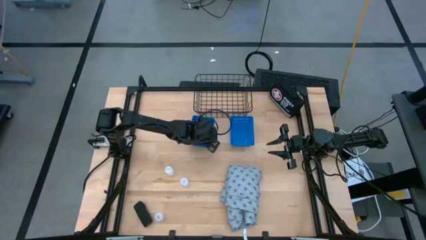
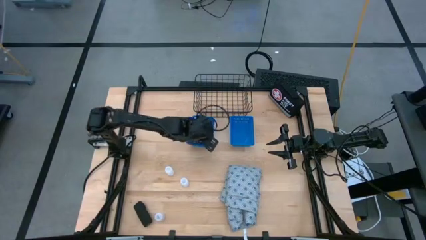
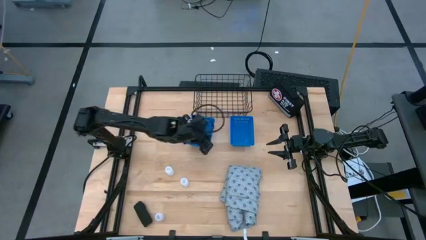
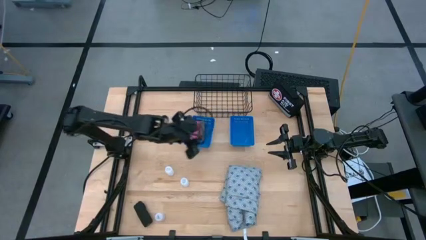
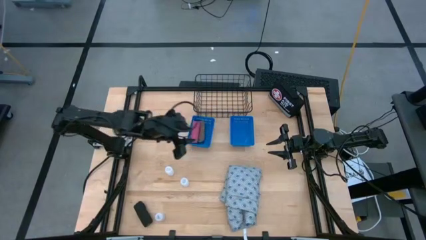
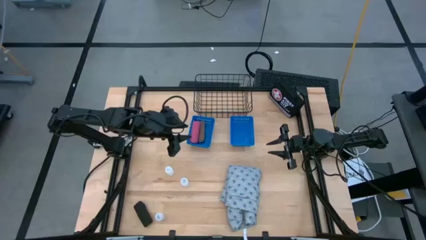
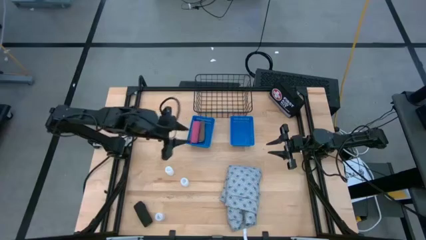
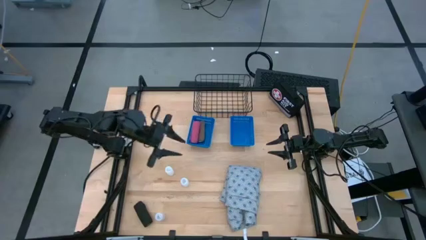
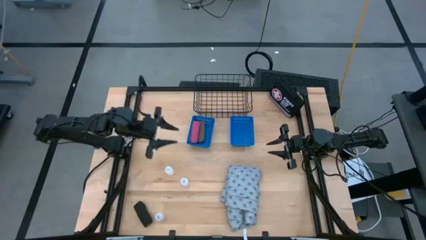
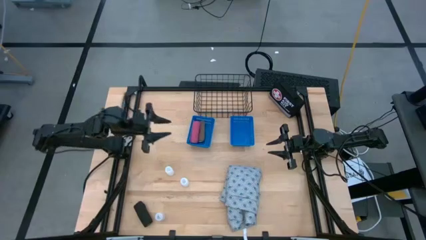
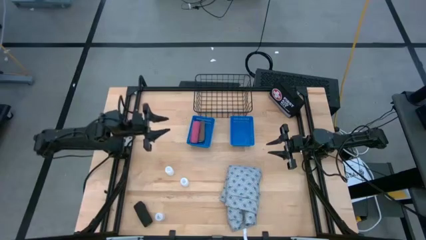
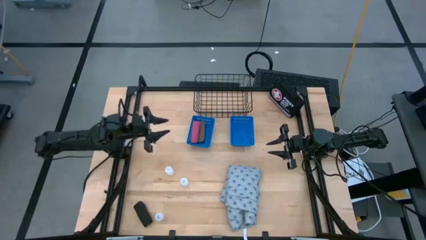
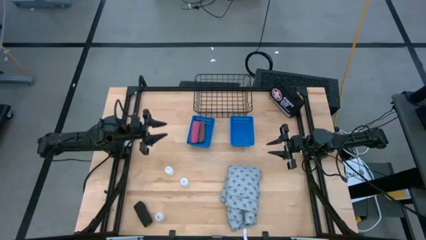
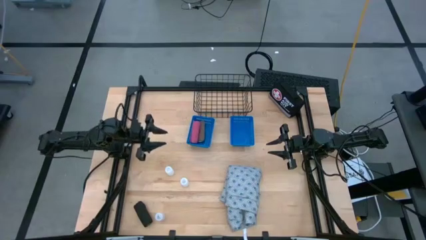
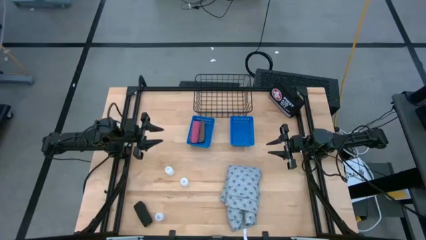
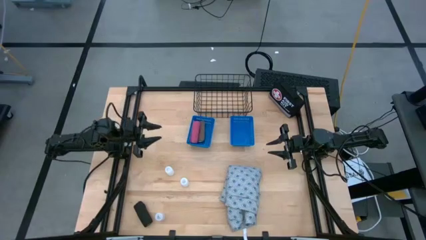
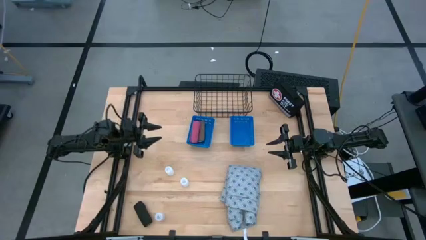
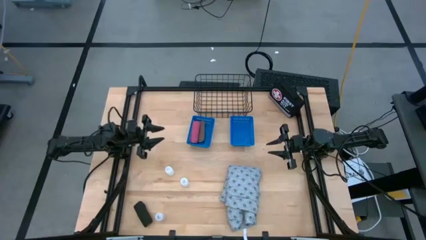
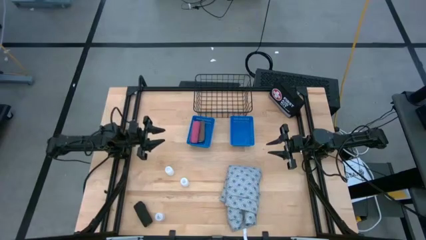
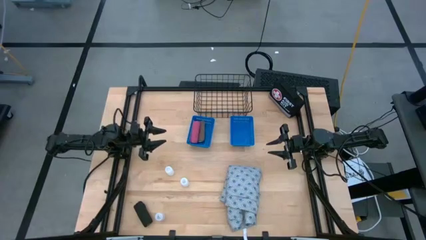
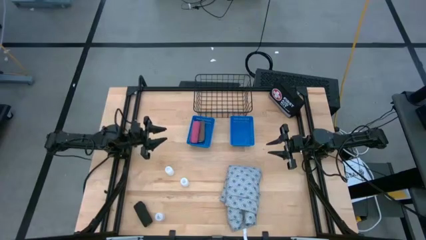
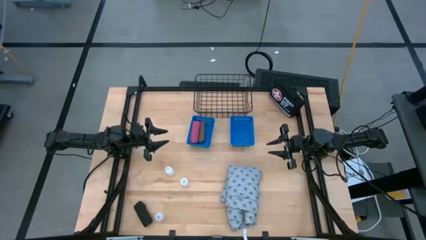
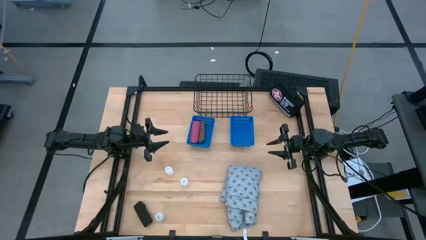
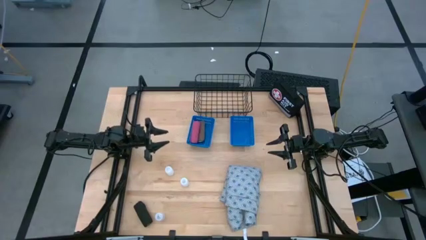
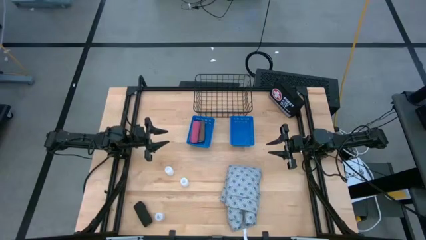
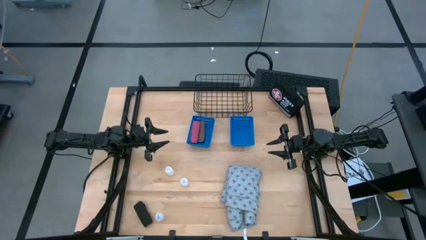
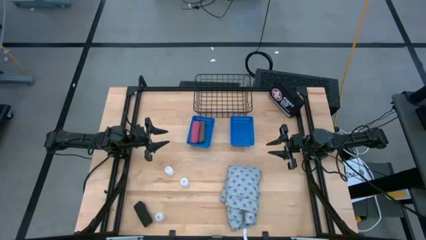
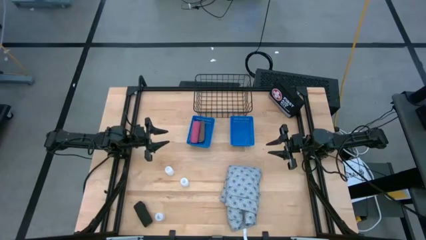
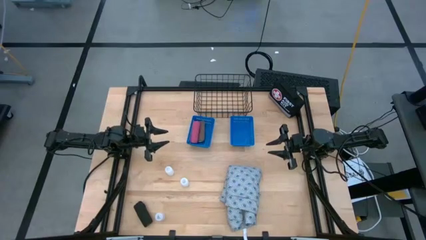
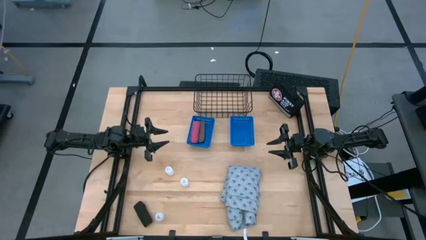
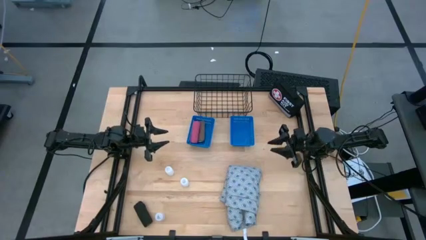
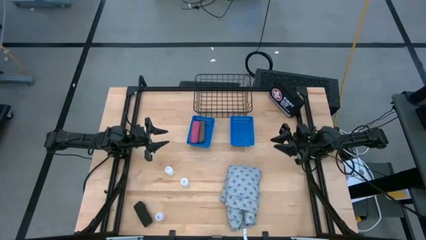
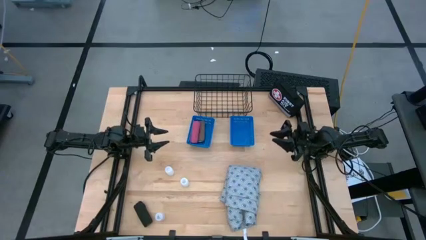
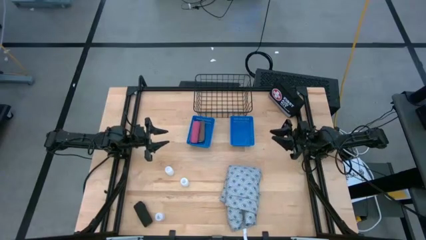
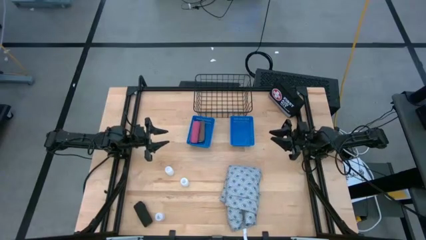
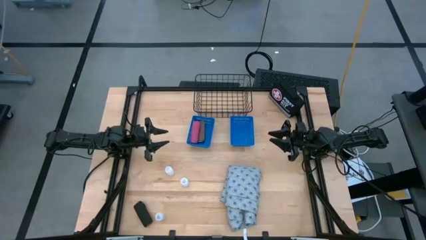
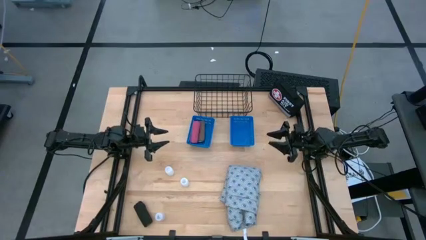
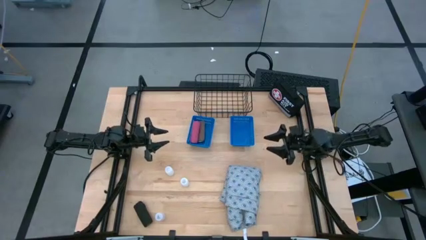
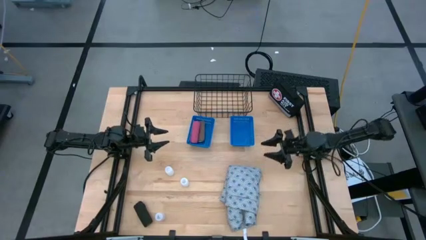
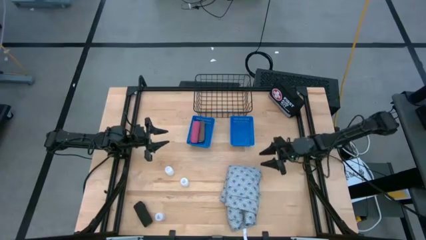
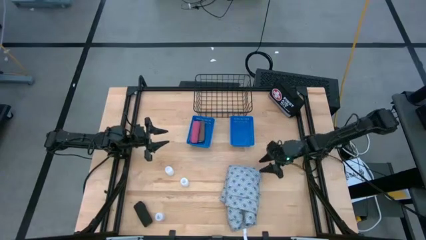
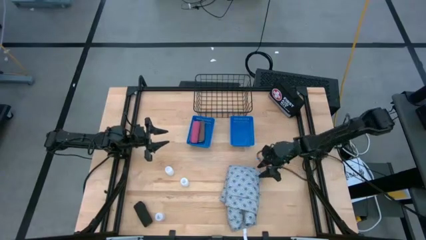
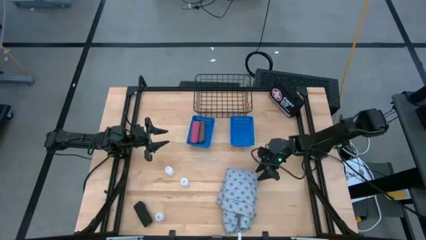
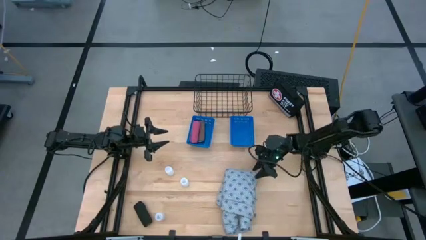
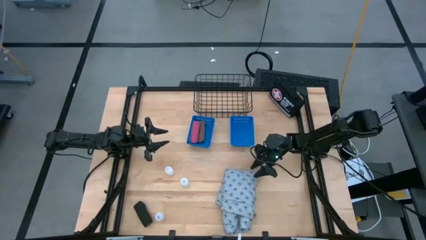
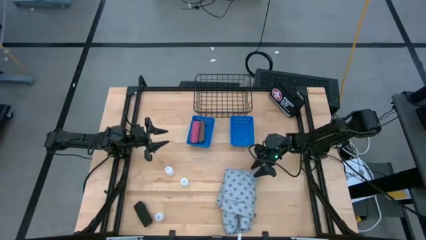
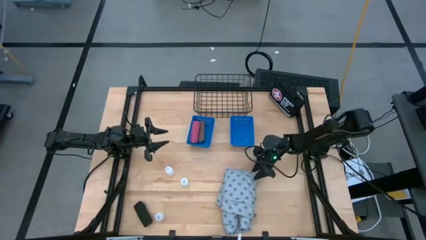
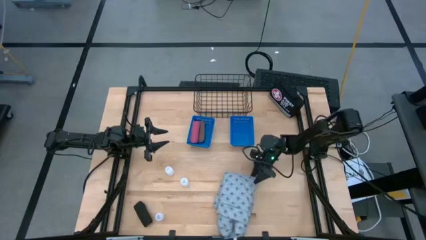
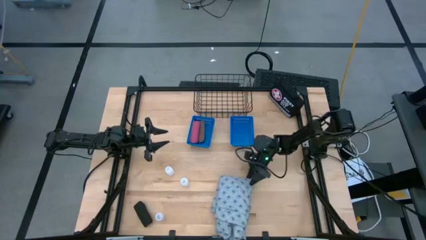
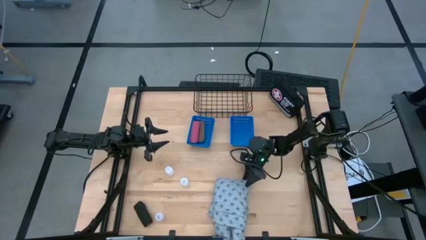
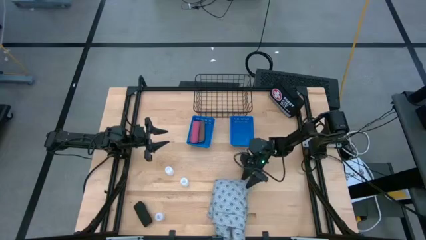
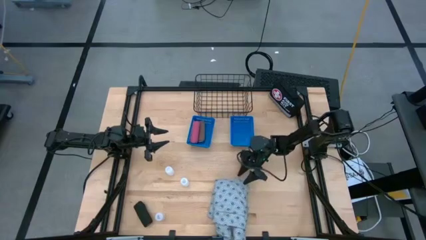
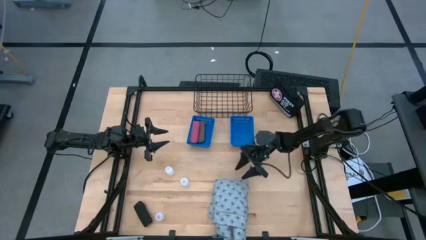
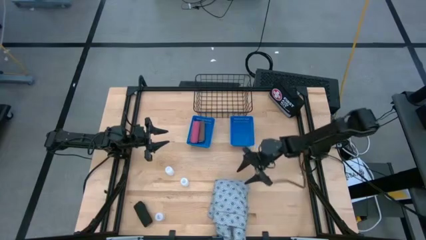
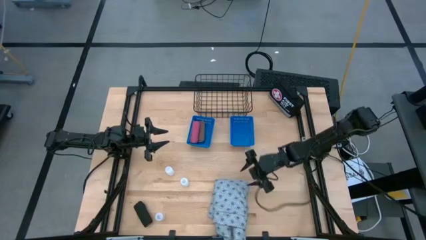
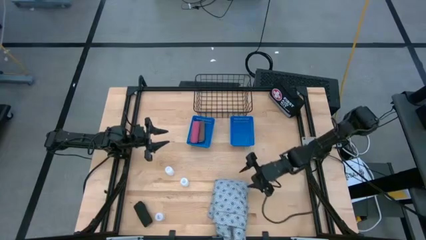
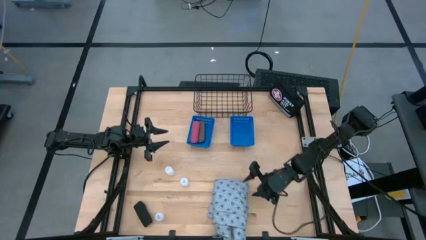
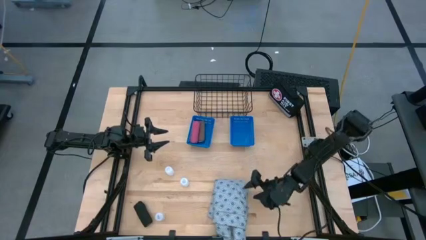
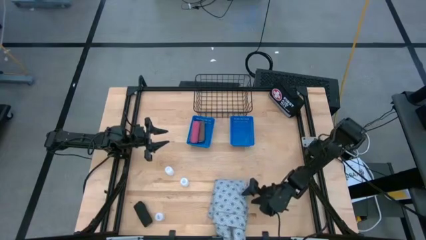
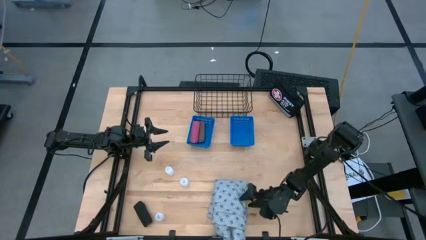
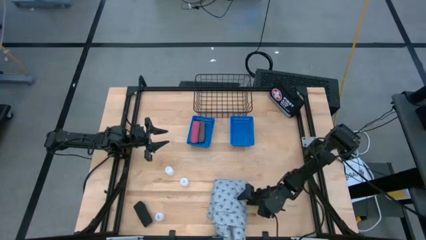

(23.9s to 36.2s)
Task: Pick & Place Medicine items
Put the gray patient gown into the black wire basket
